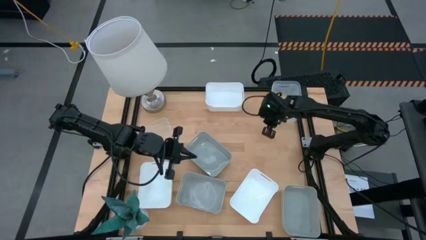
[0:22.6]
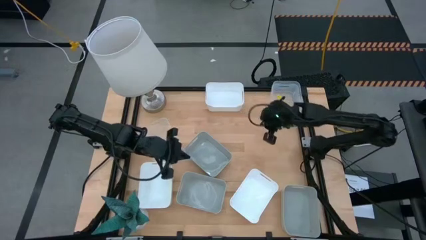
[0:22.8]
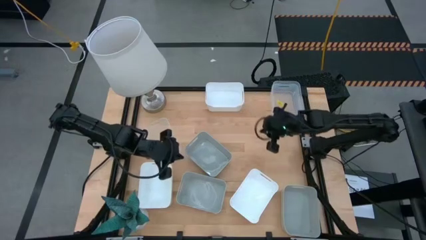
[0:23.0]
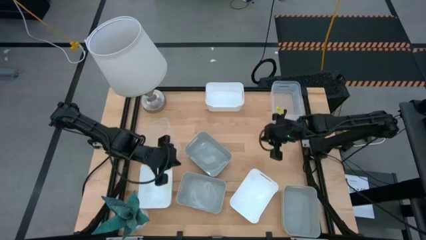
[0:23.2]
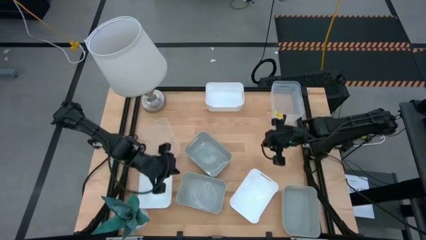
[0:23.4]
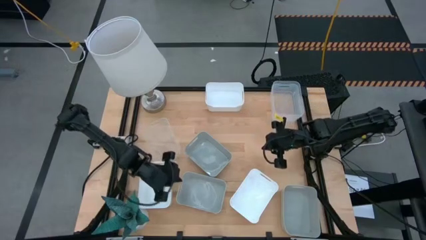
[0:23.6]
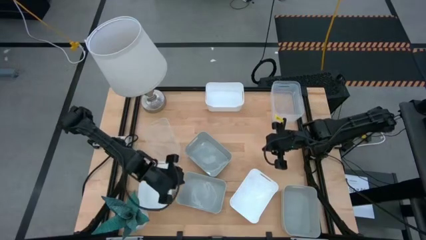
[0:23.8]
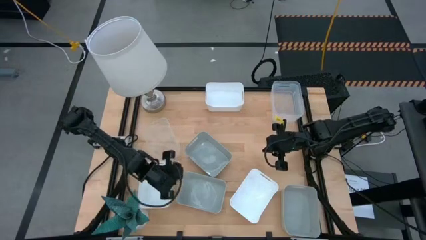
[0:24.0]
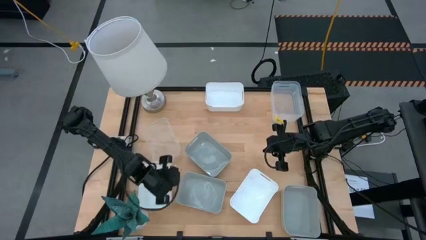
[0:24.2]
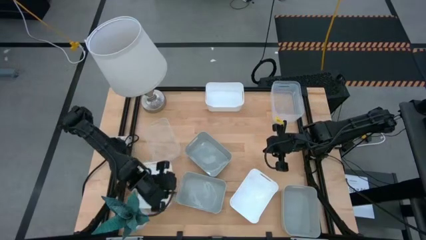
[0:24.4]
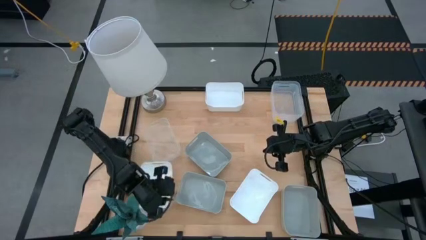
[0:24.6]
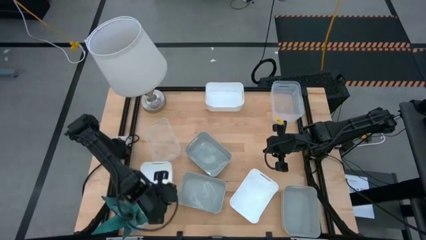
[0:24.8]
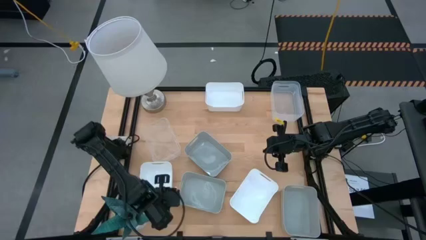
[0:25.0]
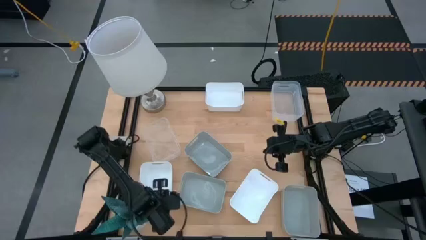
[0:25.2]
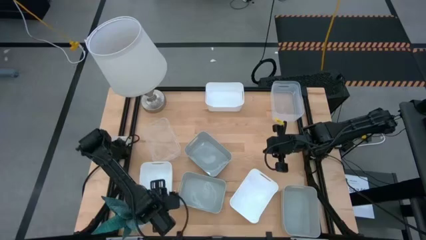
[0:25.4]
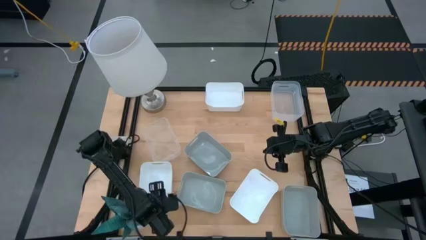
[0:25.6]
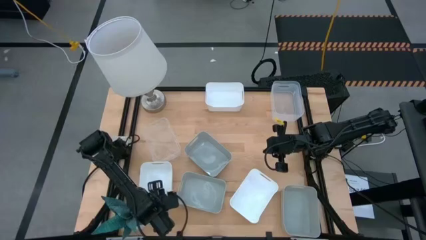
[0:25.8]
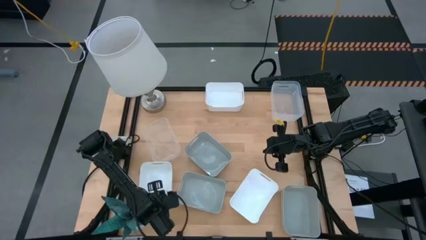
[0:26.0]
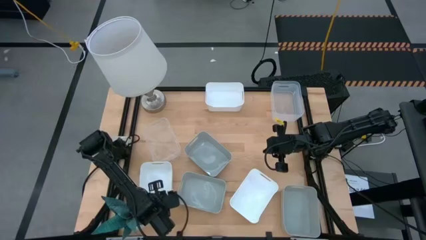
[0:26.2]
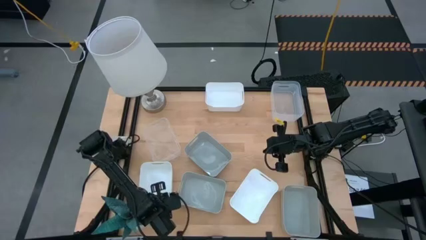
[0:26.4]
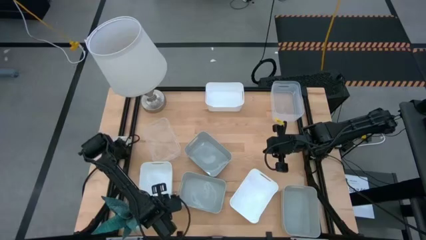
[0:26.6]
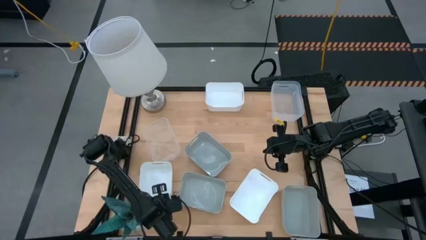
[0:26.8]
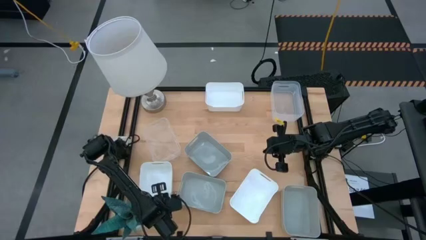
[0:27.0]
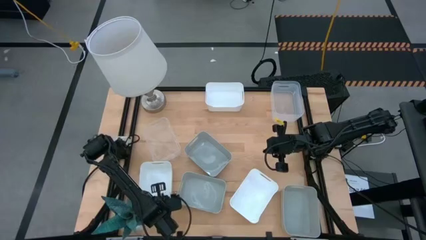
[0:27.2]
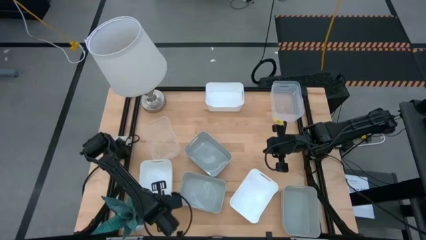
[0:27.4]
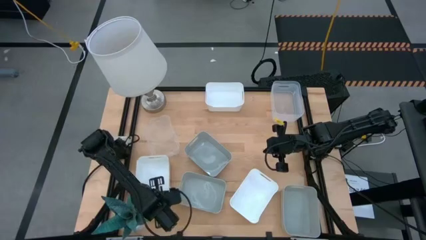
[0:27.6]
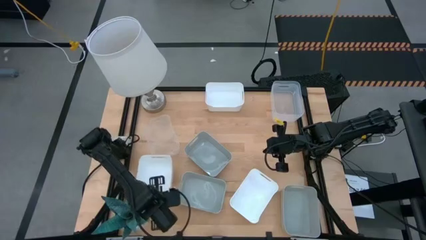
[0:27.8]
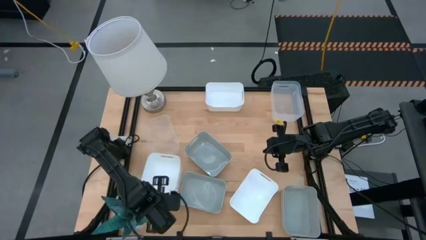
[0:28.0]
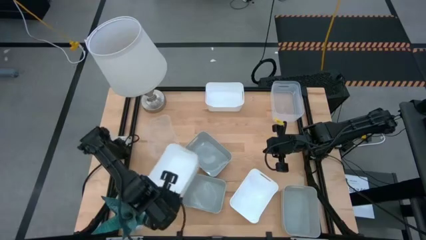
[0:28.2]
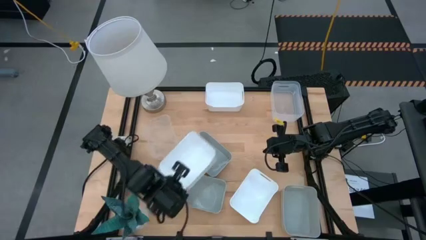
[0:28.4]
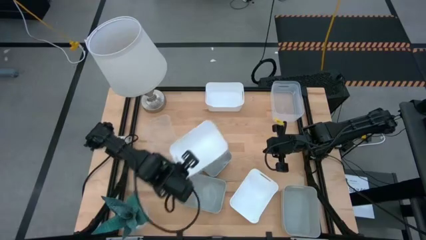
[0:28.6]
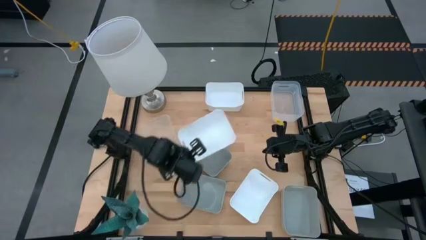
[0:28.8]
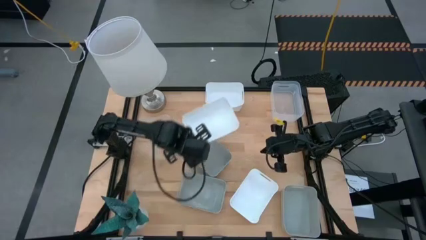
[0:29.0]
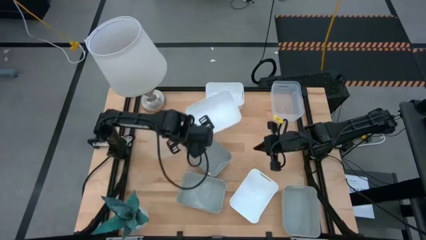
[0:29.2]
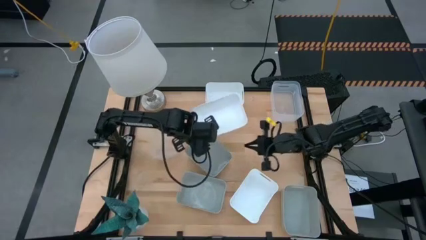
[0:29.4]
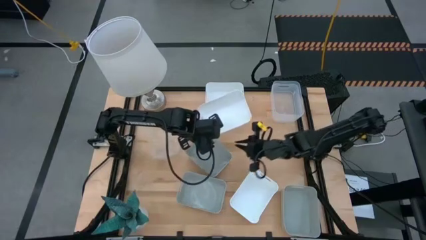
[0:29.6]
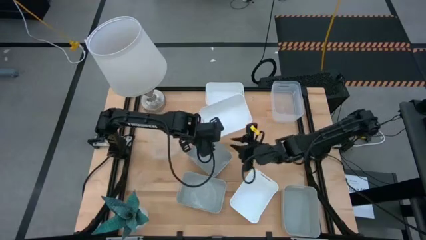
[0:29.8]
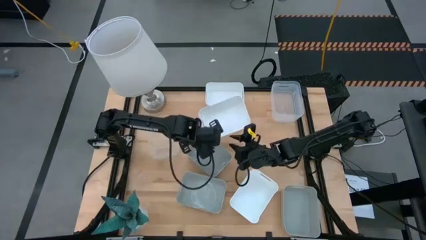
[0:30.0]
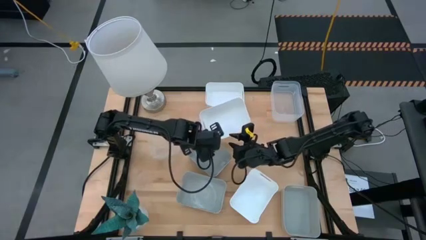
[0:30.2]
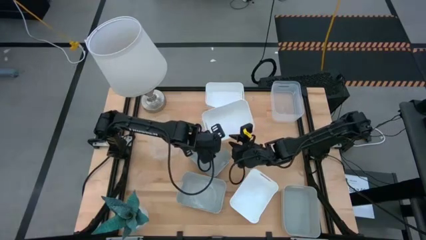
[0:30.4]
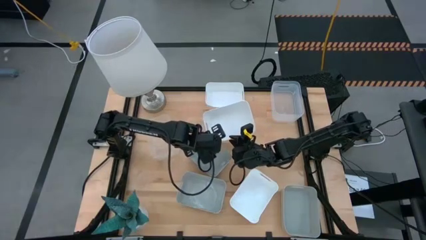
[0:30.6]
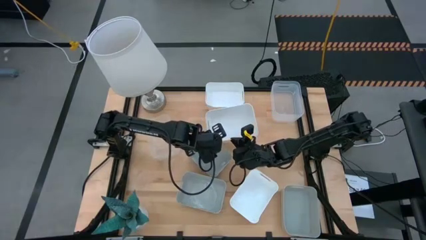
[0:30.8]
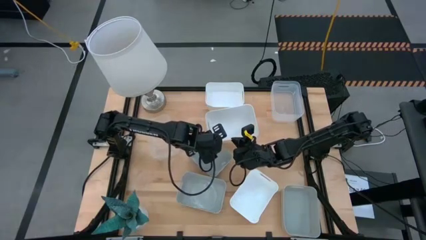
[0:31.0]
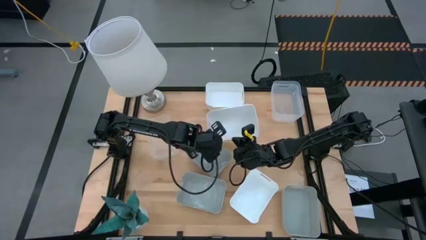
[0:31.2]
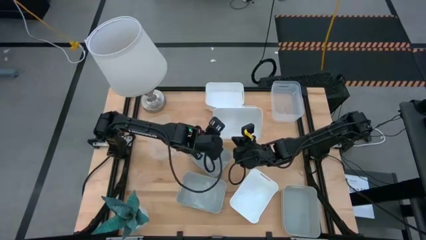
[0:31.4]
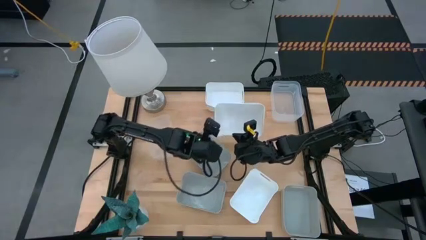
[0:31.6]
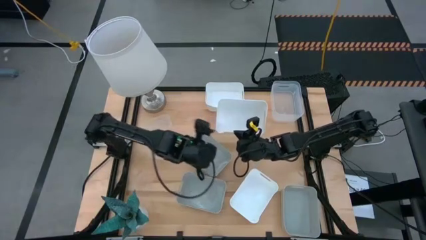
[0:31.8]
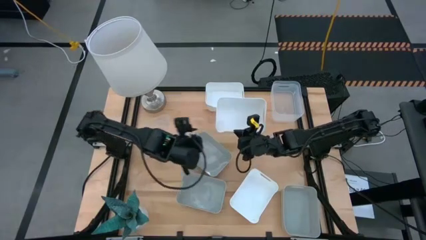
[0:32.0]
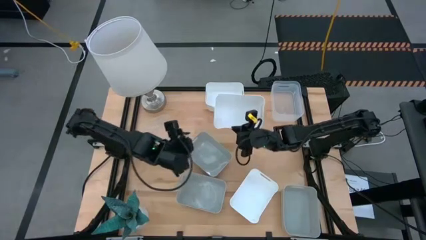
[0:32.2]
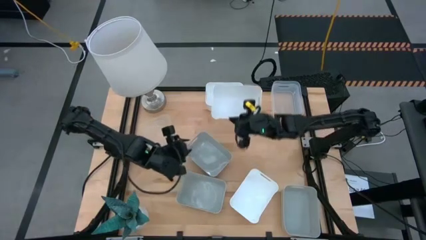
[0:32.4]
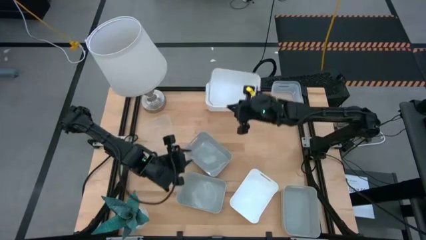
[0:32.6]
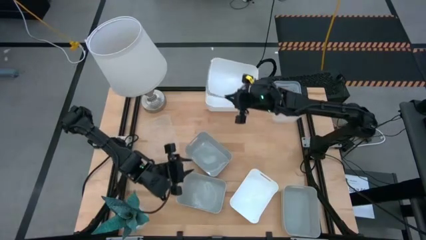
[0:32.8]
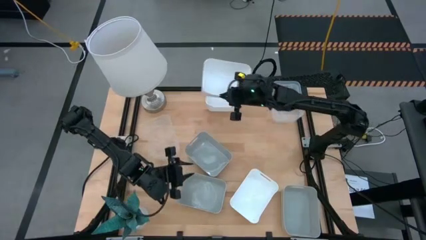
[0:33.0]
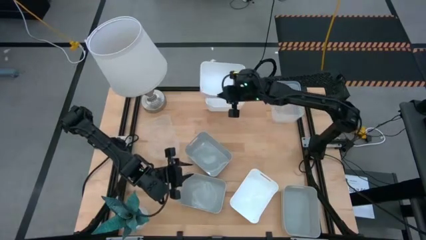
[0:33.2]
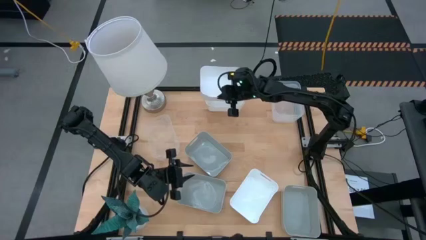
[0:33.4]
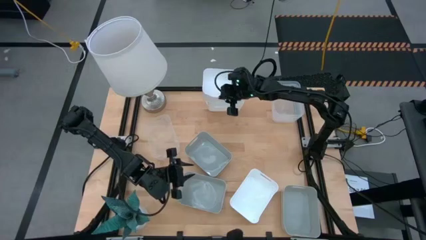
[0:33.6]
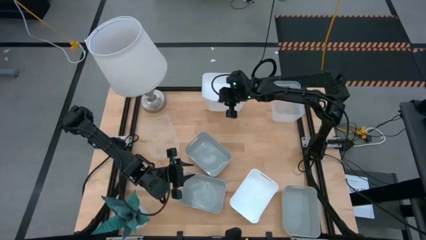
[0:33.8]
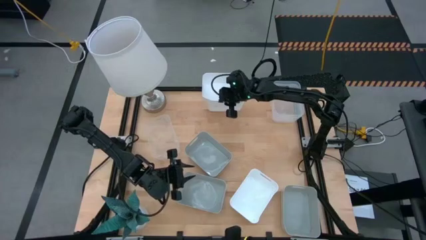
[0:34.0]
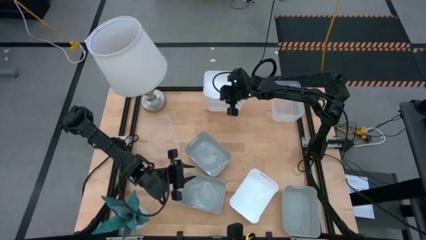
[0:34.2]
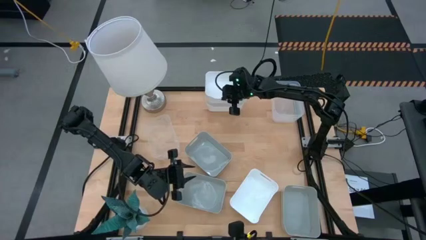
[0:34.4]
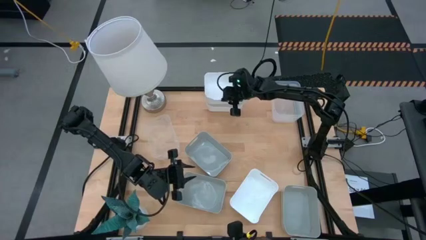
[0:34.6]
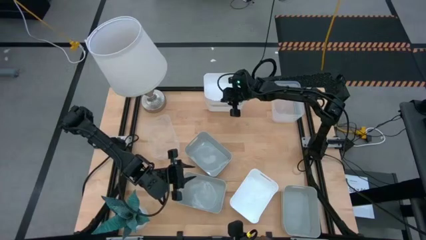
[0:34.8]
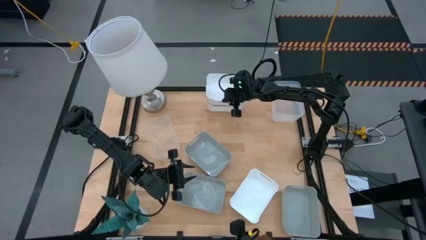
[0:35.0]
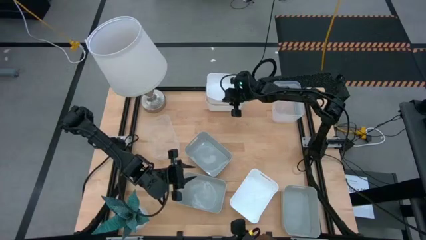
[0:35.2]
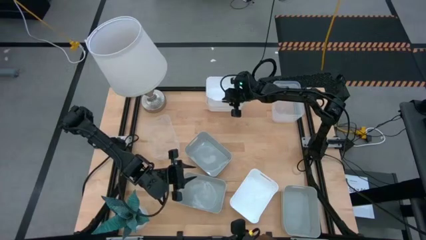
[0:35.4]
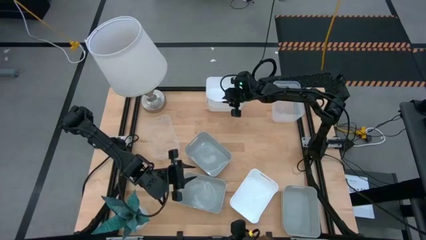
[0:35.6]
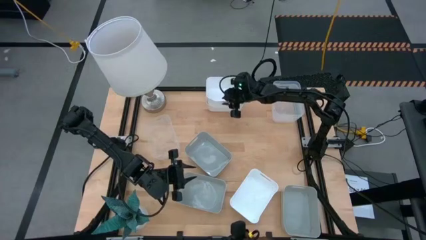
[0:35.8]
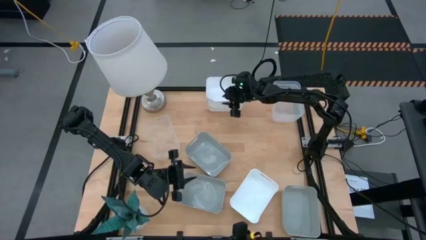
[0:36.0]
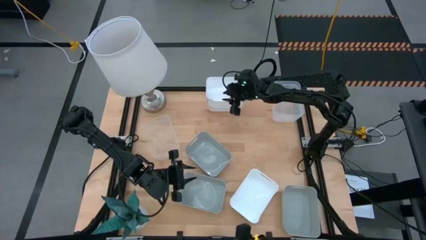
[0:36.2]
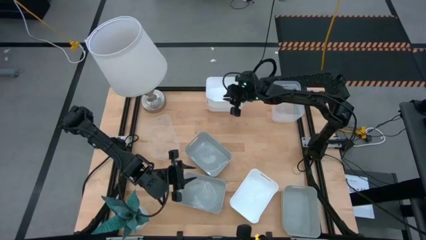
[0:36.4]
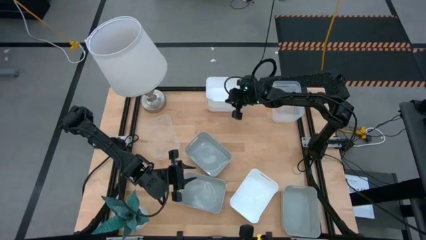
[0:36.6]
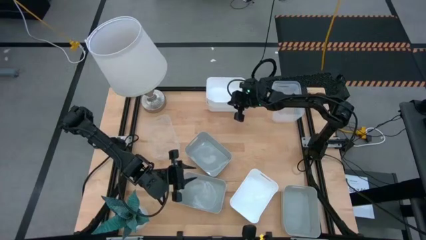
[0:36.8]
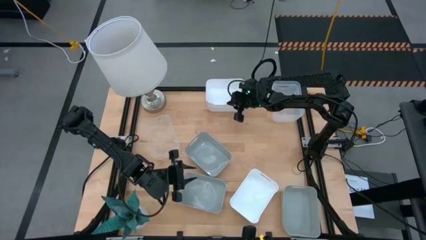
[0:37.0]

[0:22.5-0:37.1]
Stack the bottom left white bin on the top white bin
